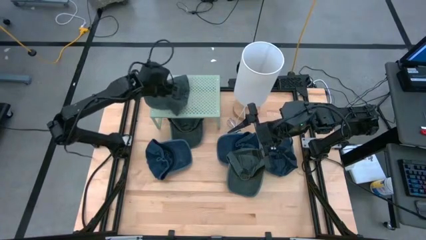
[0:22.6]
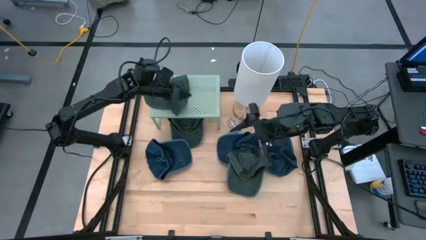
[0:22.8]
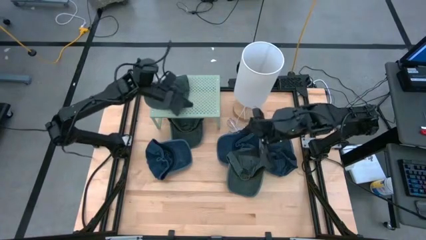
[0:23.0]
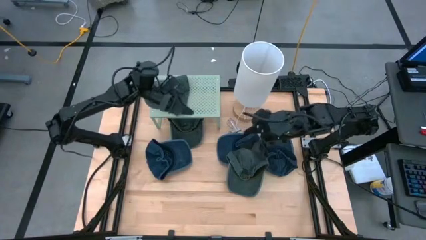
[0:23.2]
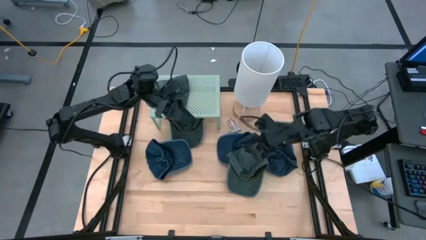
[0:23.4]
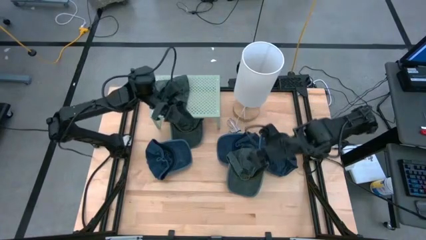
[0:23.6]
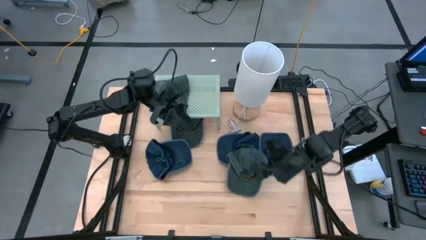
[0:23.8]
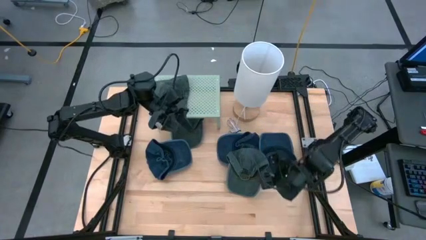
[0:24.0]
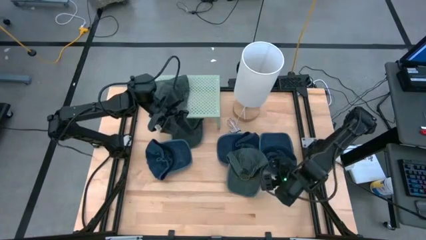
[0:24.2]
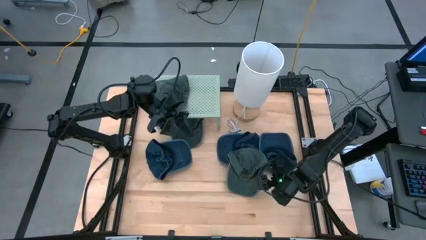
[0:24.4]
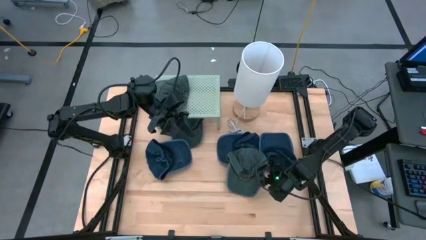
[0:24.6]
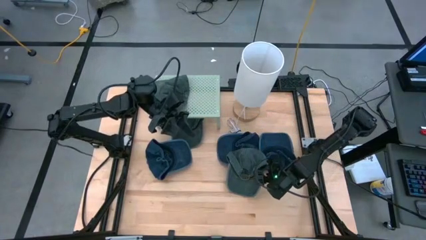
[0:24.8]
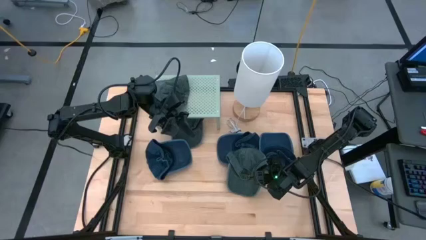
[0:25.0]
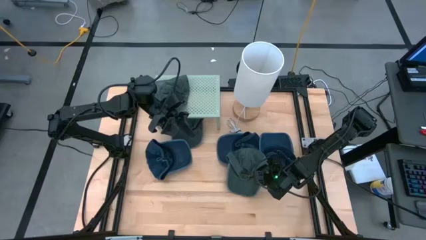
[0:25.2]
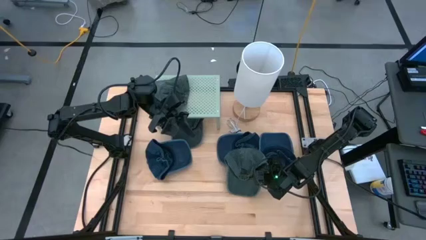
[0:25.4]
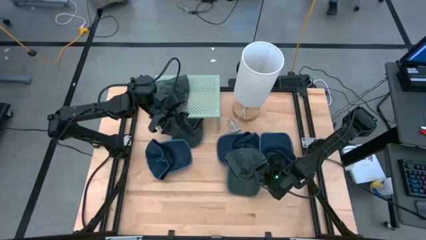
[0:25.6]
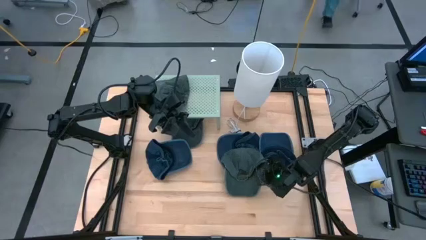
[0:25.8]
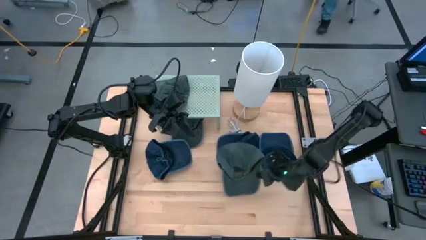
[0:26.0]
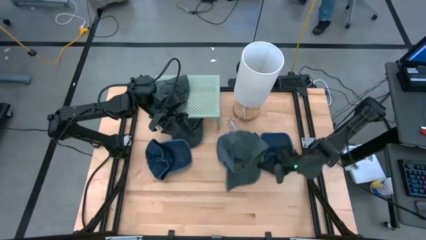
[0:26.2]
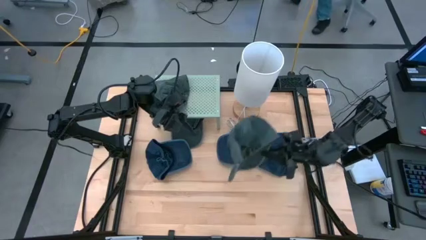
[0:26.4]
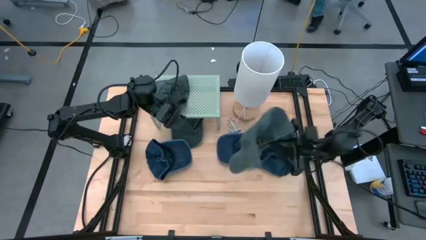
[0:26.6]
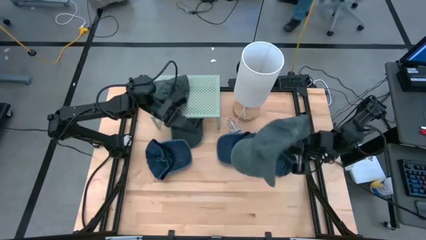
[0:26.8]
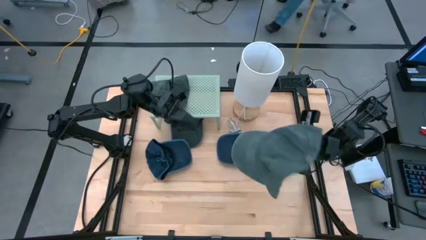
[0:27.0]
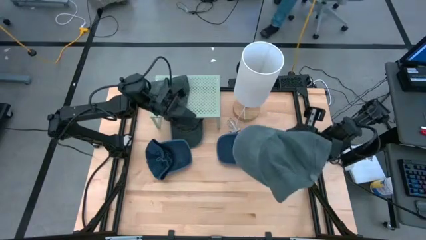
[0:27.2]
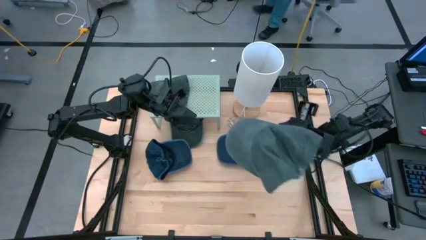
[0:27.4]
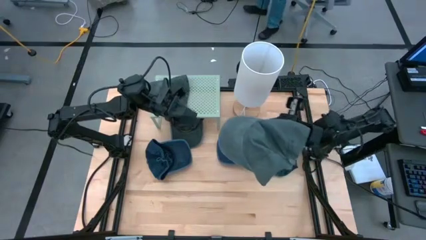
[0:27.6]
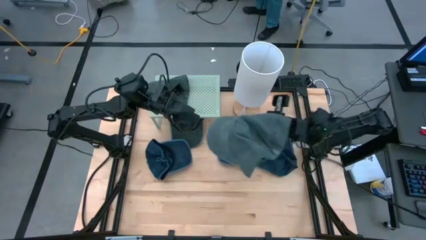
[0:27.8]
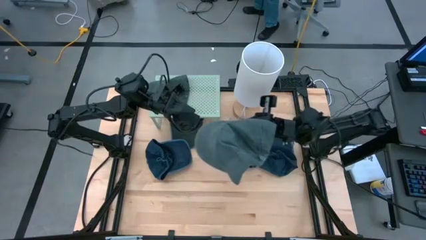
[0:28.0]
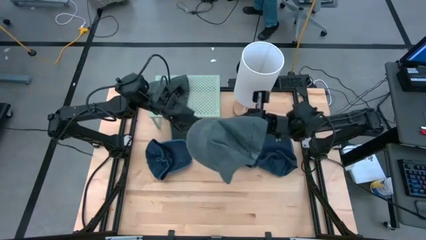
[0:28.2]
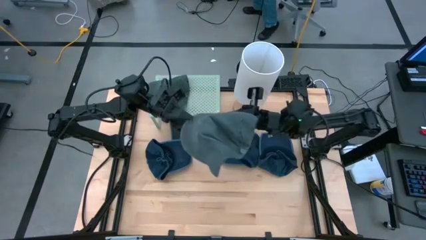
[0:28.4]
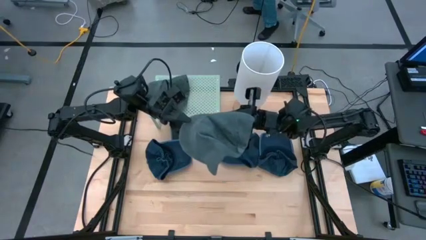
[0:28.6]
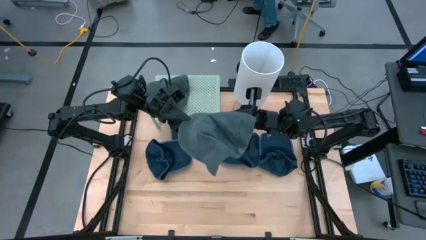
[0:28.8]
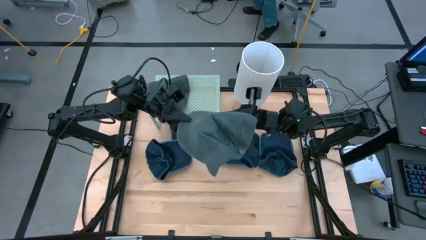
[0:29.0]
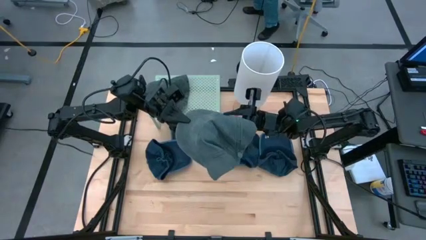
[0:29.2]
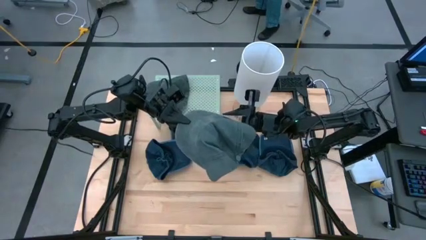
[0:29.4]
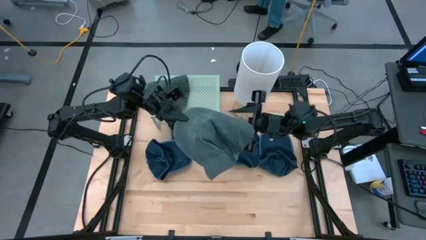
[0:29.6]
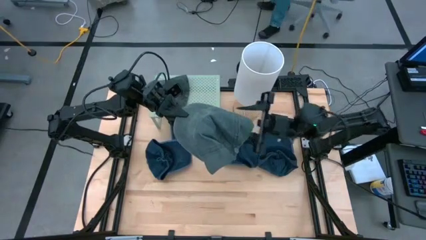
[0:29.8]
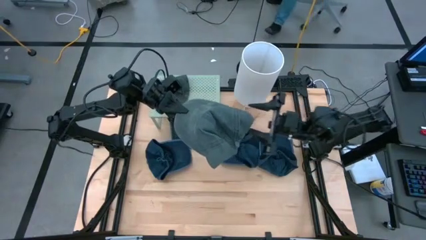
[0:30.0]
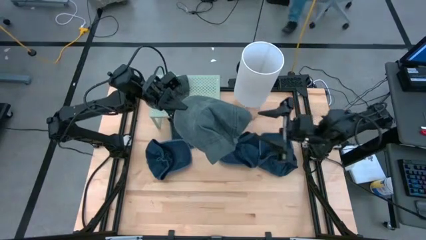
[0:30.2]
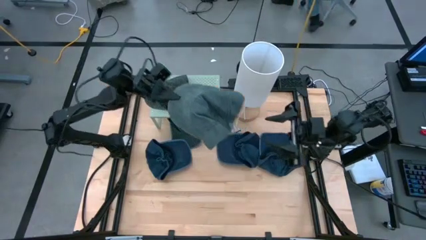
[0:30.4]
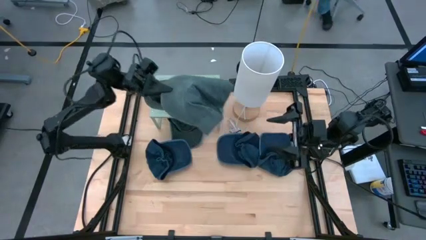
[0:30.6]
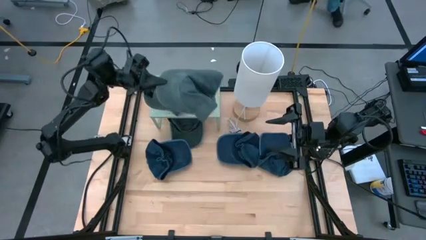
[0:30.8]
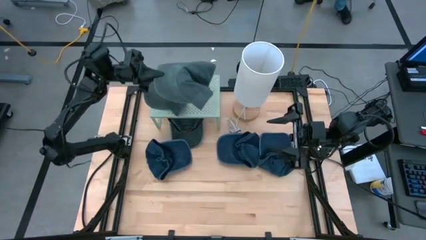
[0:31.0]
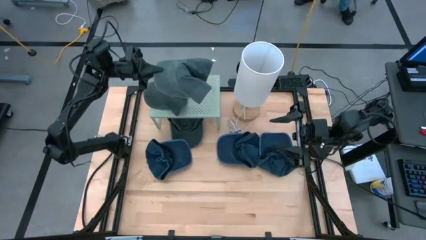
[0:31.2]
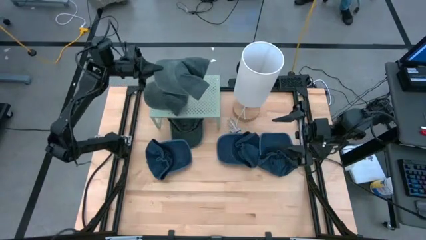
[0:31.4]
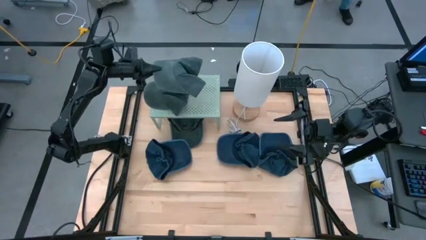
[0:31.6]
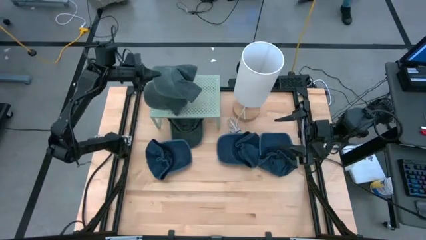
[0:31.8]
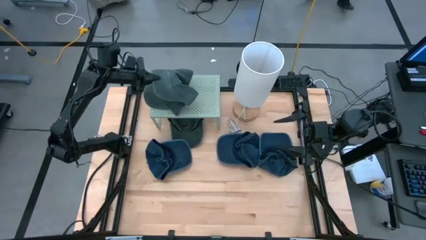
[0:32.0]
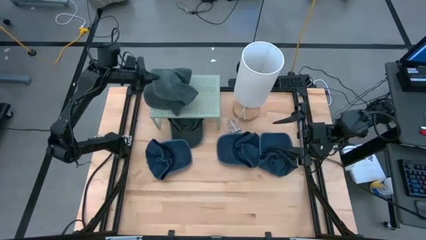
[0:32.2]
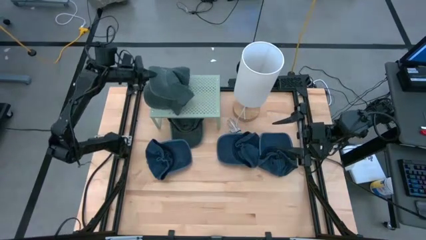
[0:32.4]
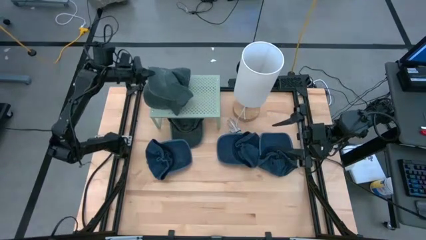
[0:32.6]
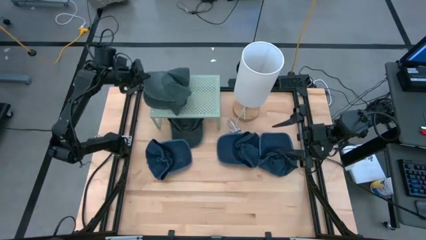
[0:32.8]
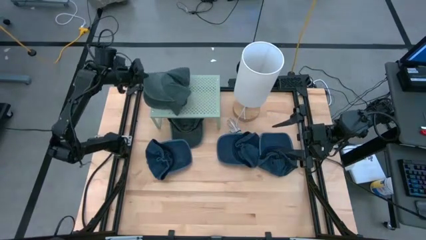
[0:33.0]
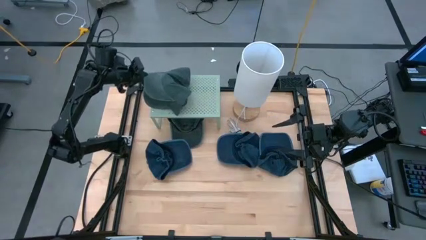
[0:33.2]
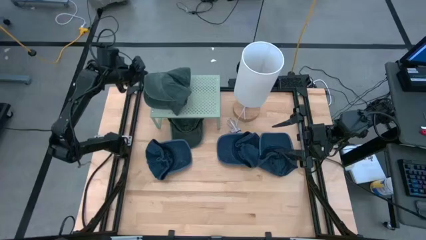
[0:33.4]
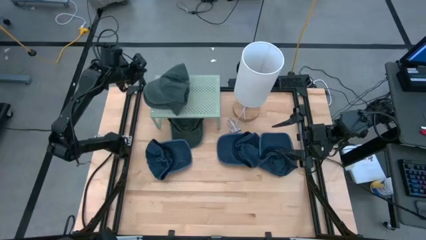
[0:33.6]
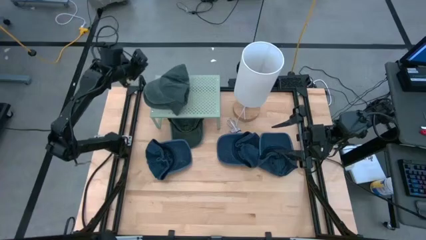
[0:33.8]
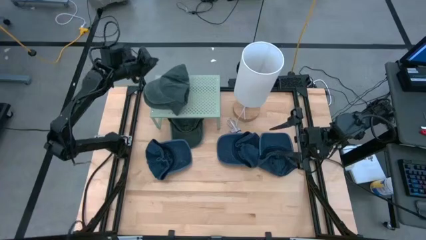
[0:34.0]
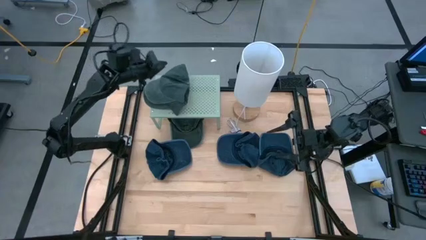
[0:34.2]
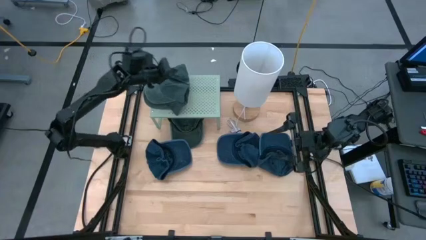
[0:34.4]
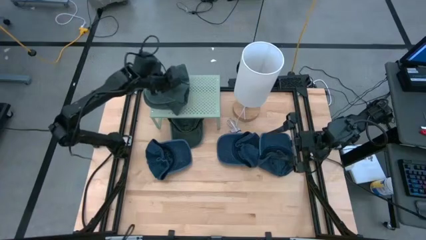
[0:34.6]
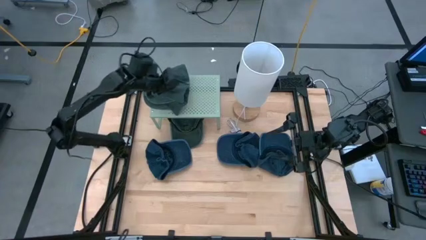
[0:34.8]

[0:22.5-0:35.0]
Task: Pick & Place hat
Stack the bottom gray cap on top of the gray cap on the shelf

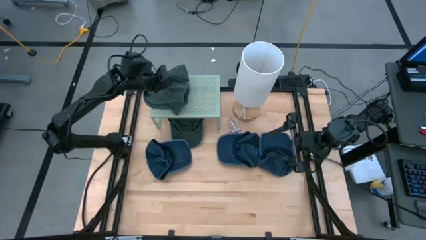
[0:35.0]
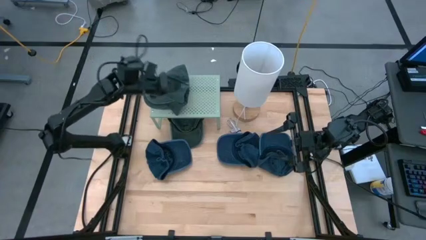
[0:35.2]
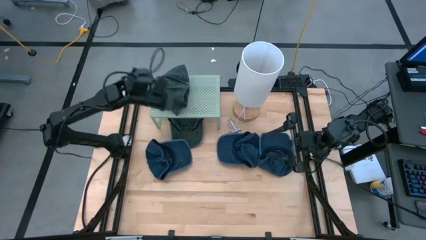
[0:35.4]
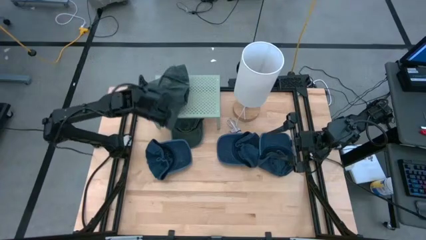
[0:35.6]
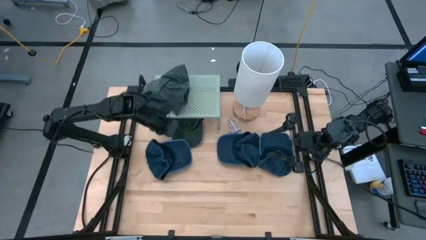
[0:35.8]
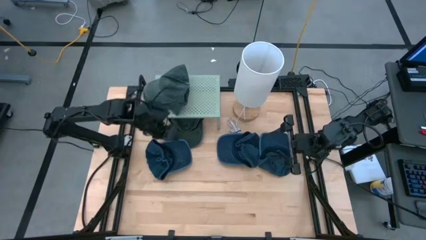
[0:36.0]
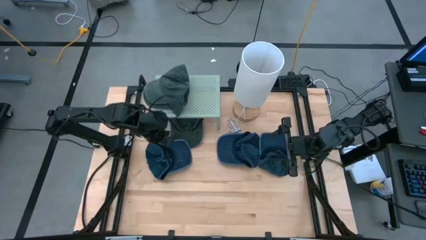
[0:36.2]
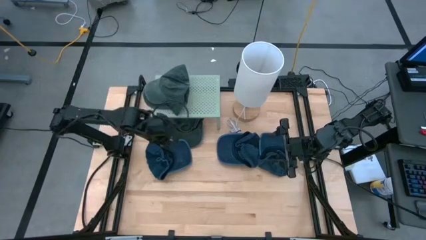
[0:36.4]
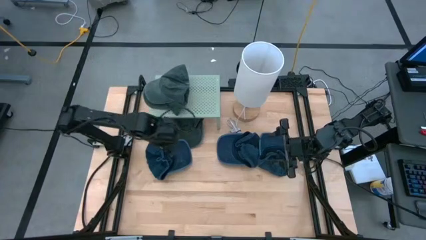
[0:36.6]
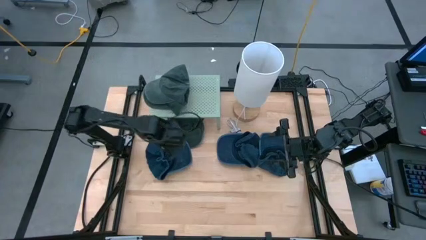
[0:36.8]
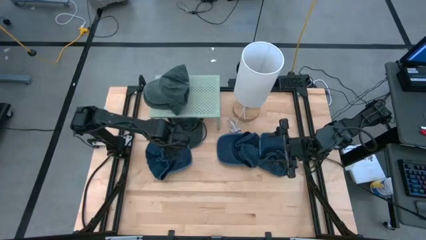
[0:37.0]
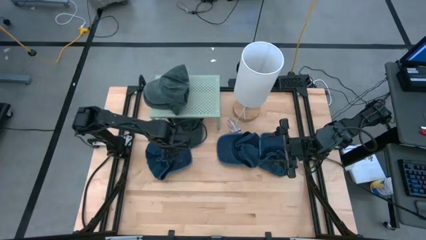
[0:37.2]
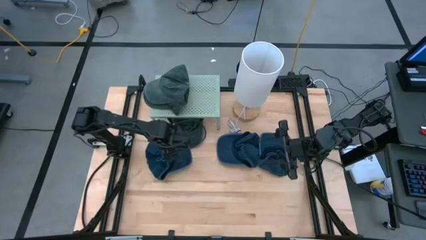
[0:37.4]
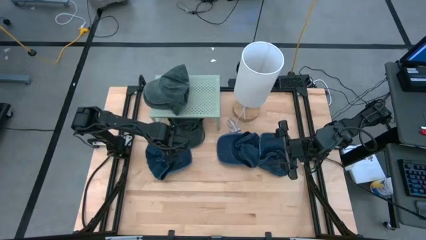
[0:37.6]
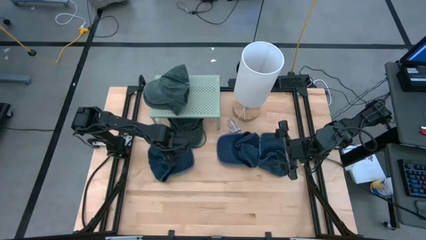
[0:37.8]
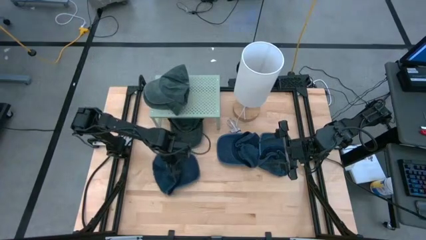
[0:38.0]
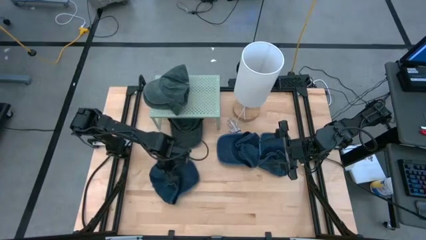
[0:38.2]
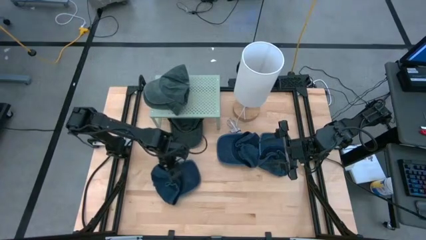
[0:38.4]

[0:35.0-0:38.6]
Adjust the left blue cap
